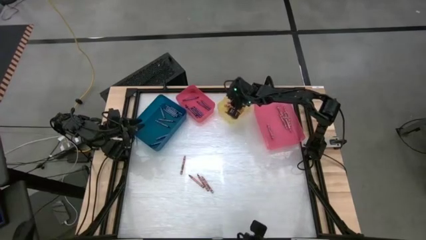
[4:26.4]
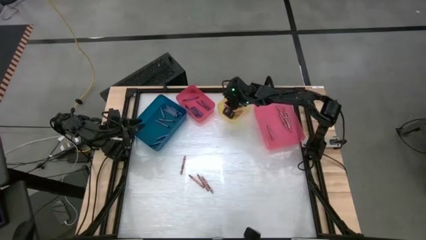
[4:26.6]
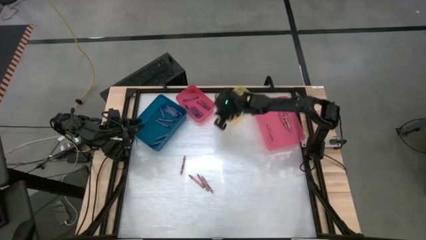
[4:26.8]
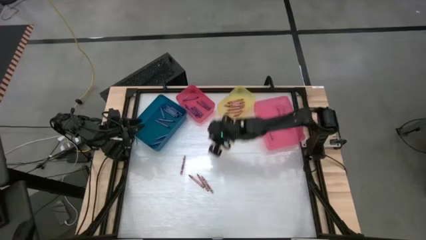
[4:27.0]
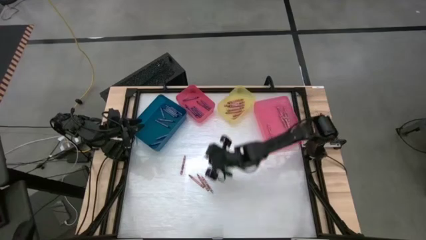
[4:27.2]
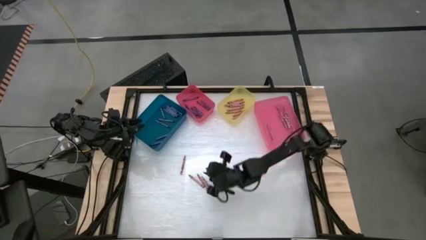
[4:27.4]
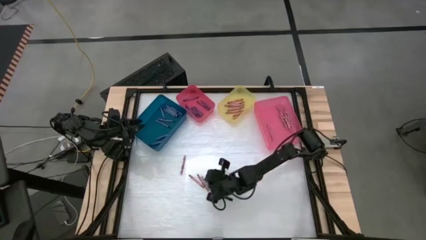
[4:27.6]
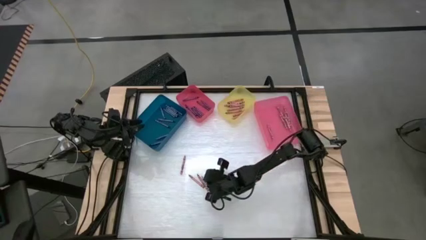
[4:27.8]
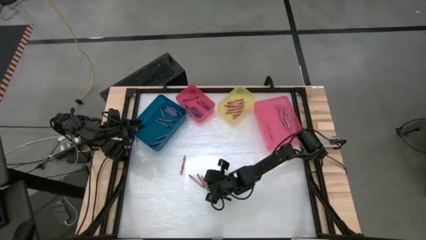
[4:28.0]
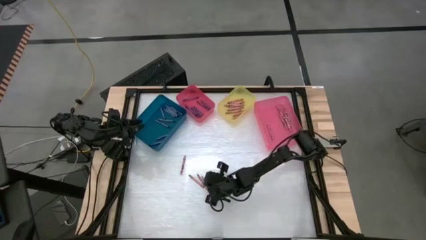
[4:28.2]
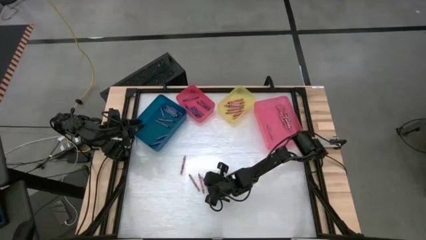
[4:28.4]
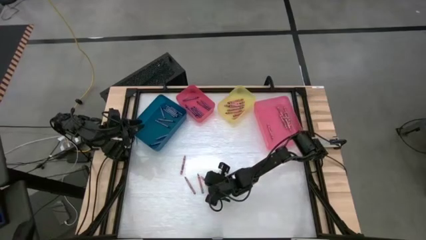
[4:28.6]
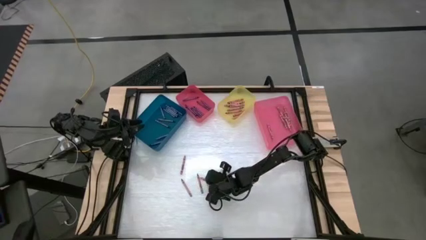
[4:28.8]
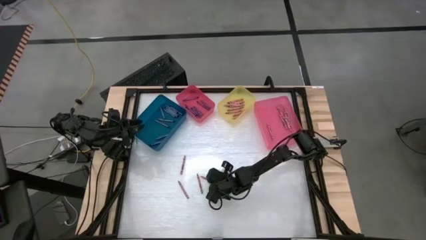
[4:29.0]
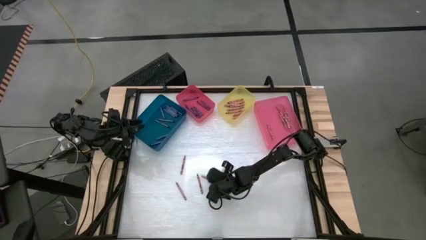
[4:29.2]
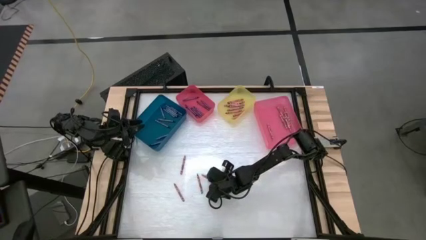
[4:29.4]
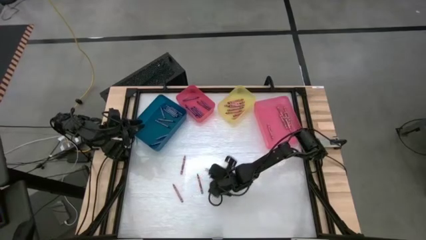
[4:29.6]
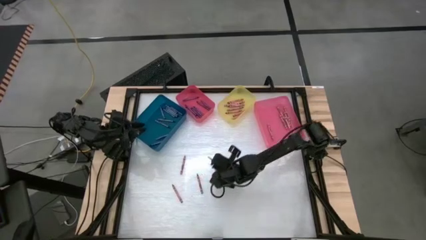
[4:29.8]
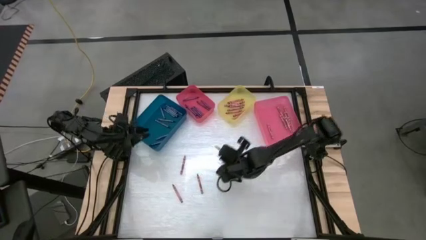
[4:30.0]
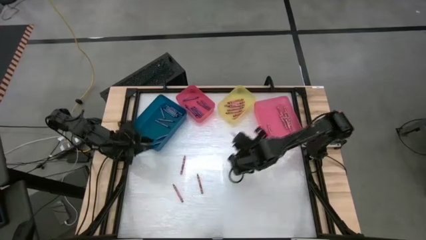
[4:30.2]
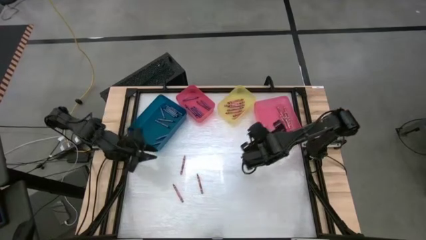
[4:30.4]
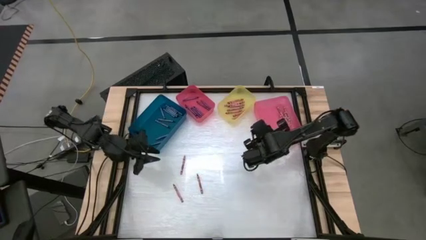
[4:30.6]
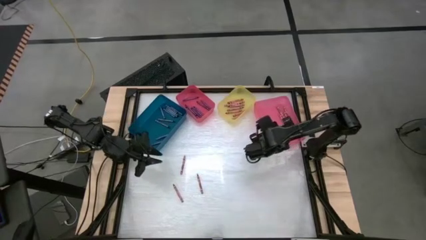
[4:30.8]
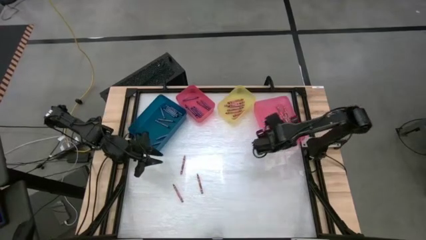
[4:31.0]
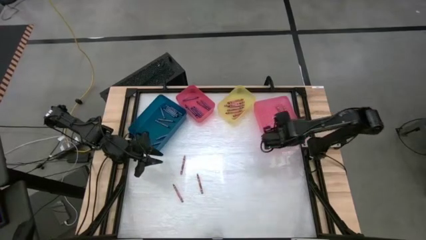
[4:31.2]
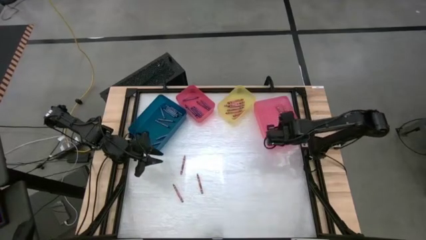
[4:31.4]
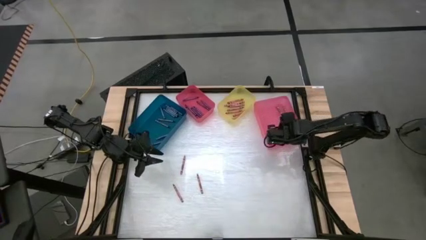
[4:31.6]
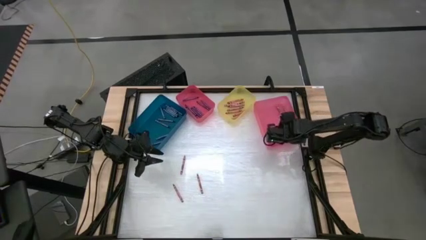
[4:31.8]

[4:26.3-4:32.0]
Task: Sort crayons
Put the pink crayon into the right pink bin

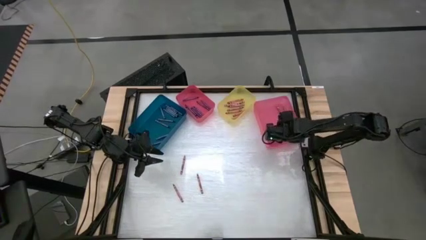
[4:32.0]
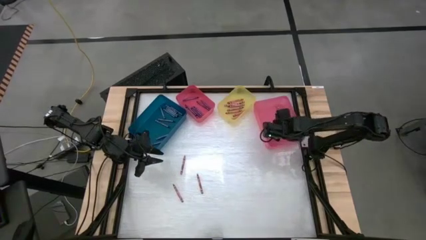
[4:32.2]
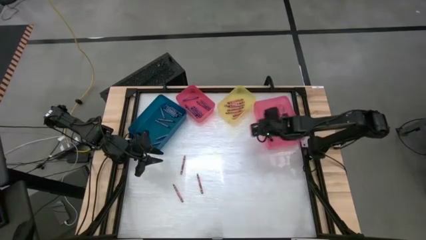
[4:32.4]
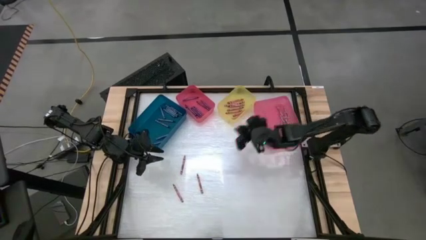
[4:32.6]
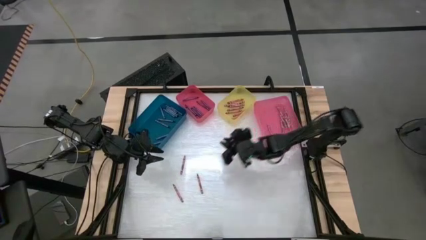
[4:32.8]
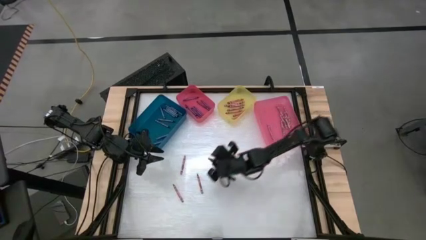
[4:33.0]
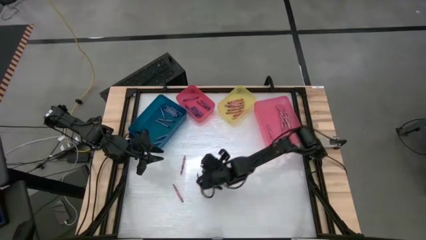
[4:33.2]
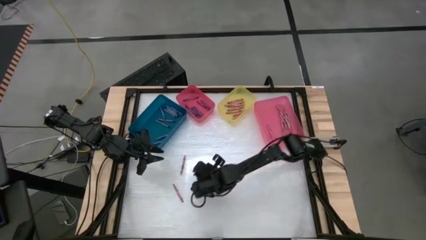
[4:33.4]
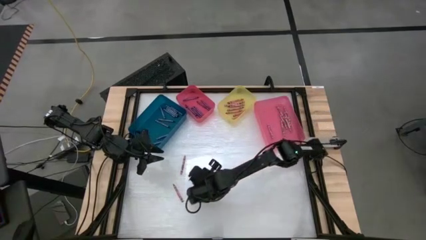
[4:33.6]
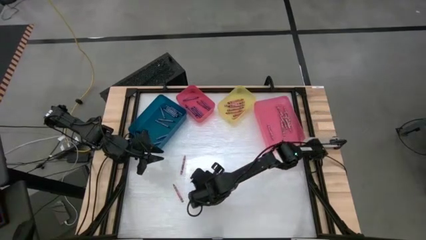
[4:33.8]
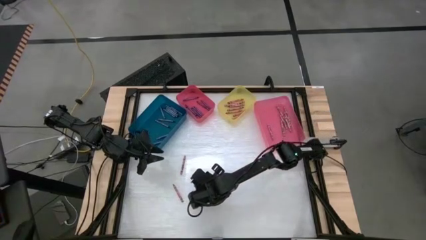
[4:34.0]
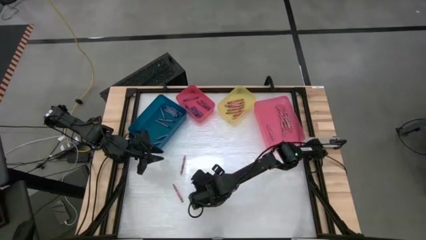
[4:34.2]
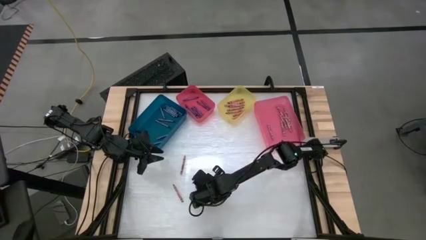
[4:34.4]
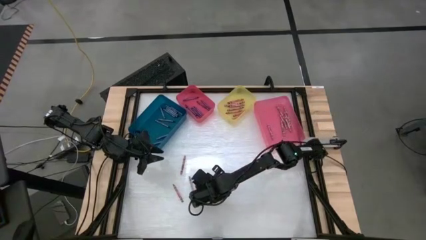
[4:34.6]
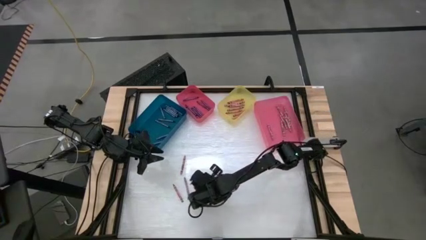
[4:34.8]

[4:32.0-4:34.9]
Put the red crayon into the yellow bin

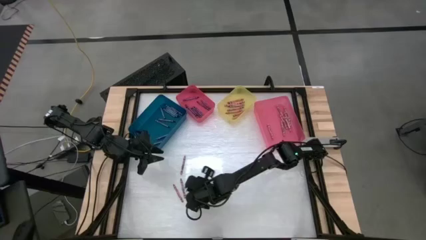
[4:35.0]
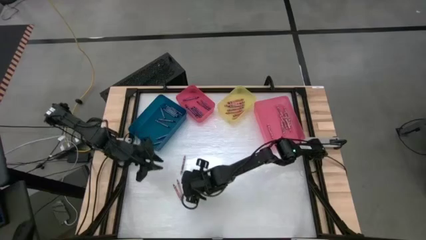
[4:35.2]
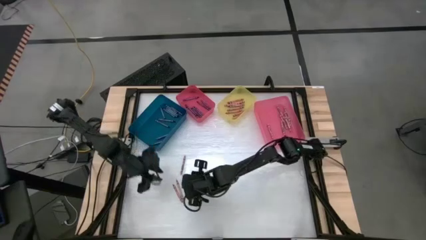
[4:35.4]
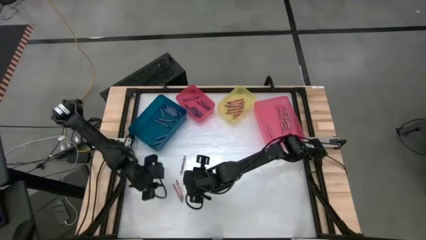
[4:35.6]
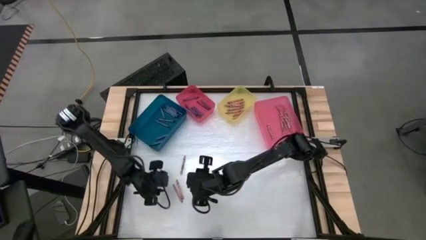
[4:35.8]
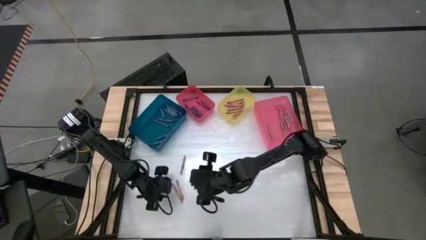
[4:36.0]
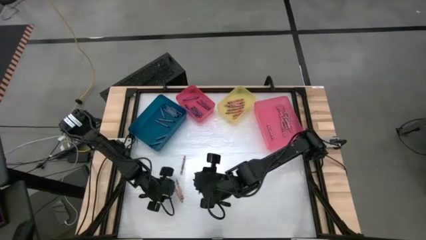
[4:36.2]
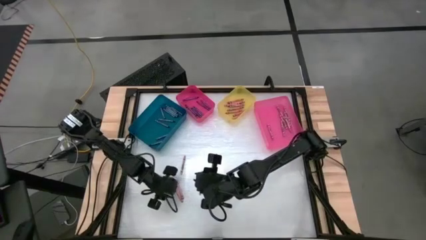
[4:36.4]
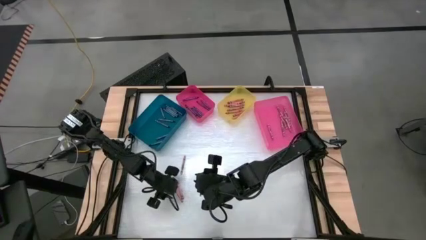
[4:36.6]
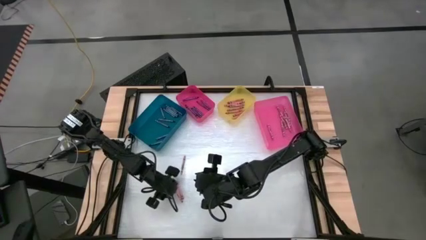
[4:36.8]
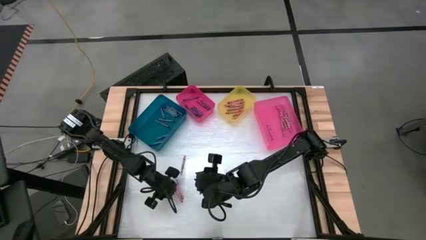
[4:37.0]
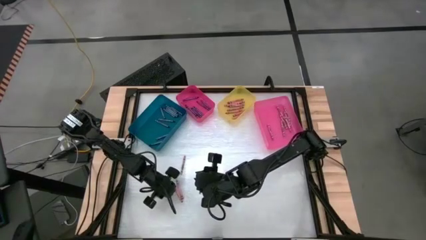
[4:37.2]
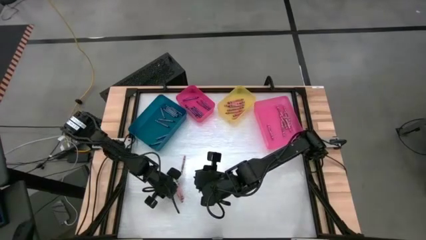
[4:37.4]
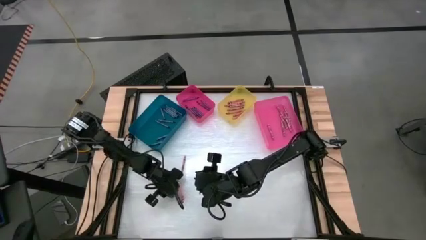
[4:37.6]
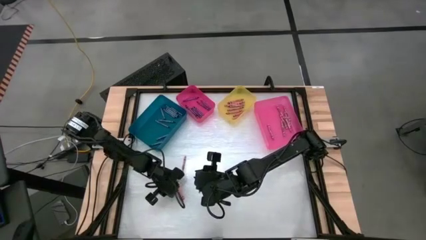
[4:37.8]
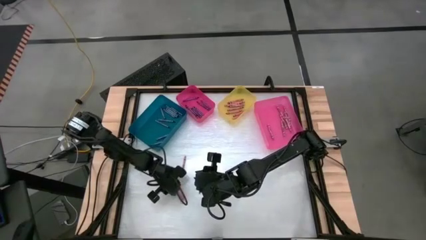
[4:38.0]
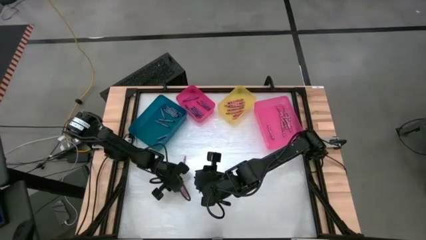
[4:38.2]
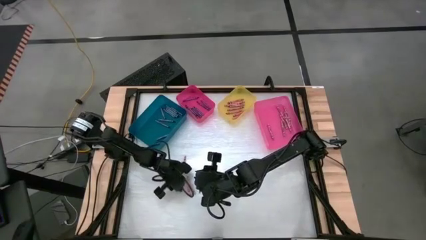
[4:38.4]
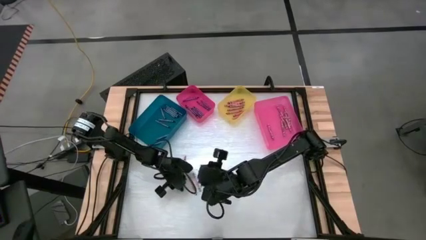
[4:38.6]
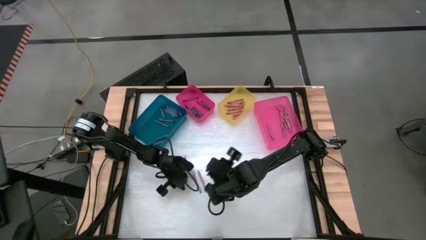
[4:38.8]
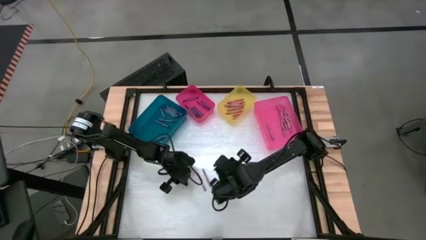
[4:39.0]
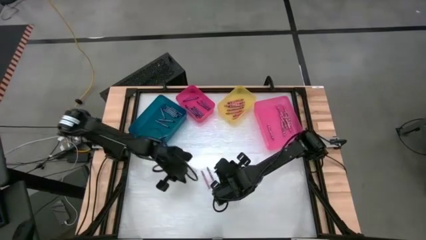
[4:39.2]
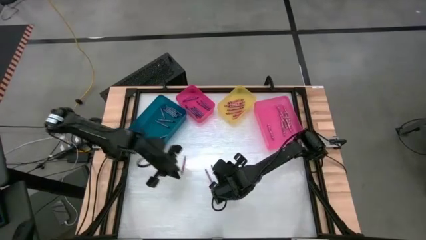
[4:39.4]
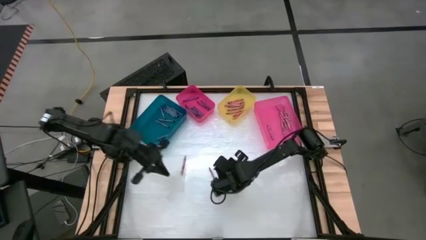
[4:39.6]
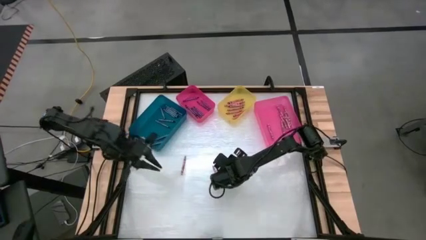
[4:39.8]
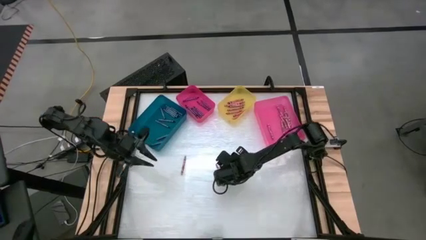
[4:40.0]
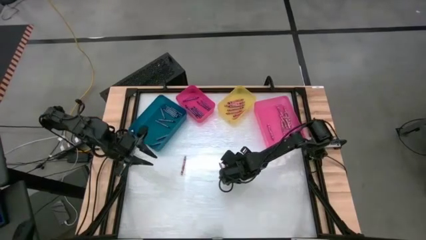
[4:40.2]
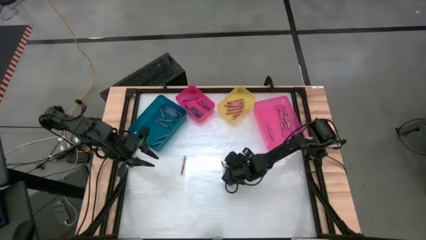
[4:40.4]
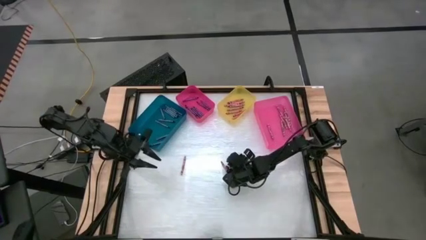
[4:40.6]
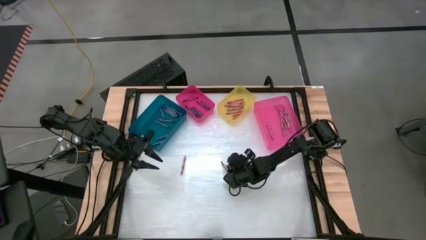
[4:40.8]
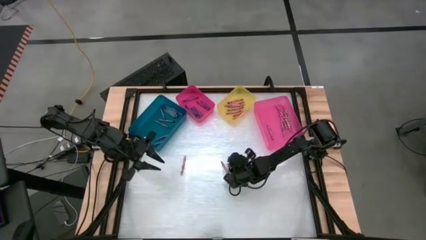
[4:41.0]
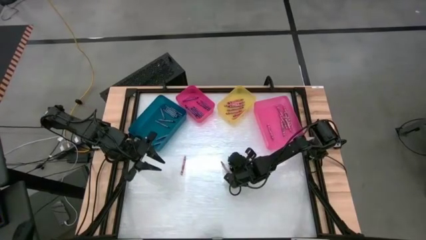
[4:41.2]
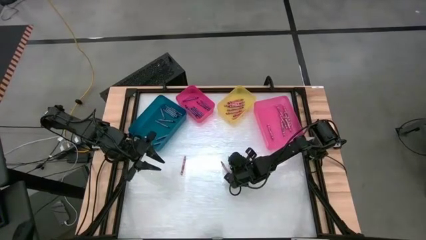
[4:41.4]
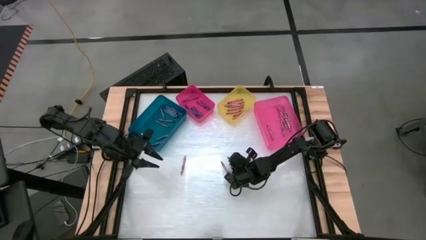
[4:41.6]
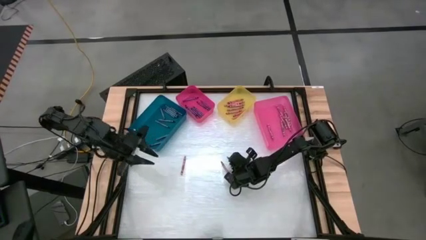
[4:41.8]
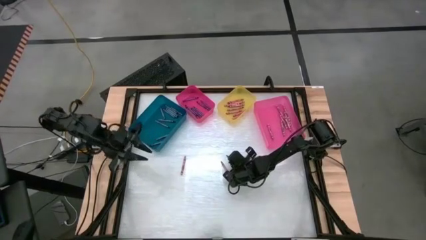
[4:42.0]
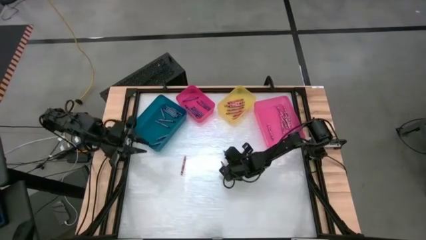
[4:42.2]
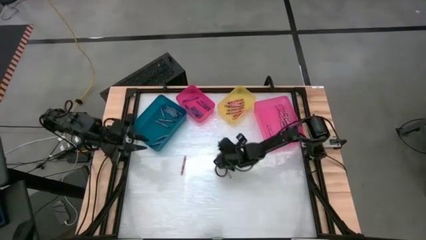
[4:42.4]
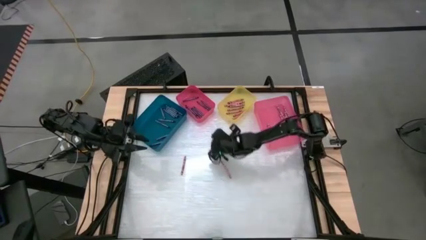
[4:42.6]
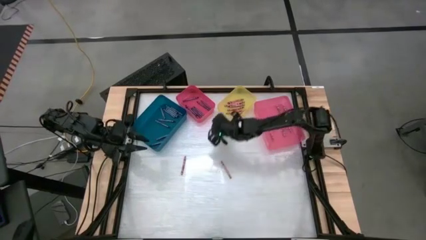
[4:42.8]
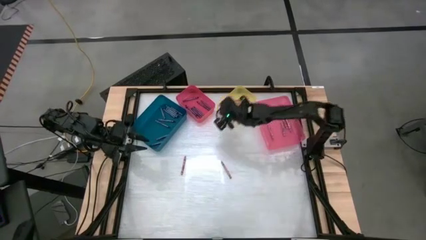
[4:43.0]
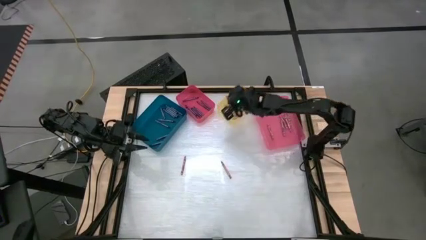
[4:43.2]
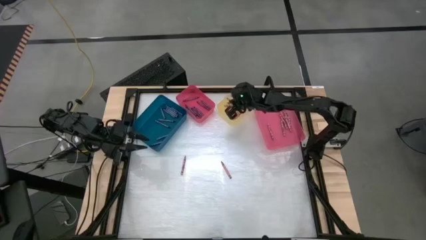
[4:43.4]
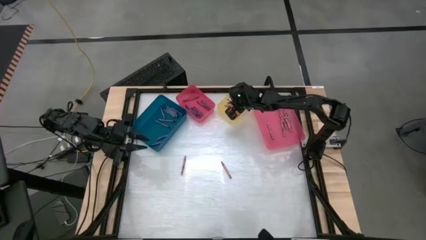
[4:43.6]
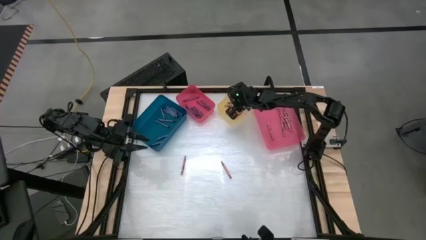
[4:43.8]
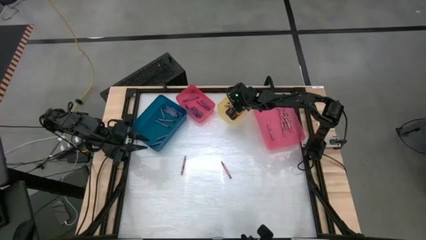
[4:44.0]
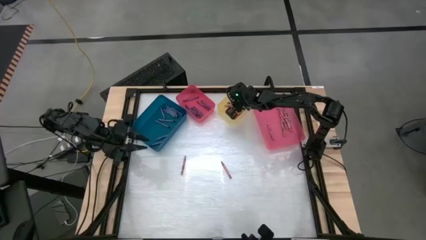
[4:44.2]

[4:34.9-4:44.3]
Put the red crayon into the yellow bin
